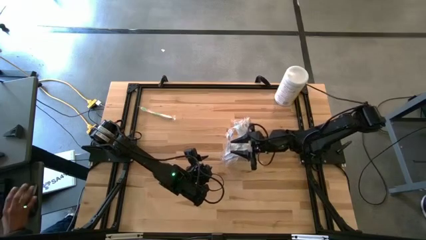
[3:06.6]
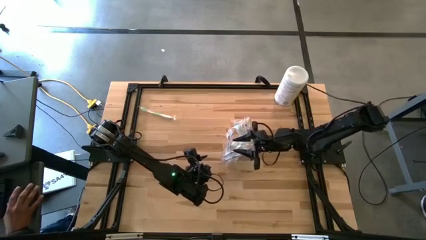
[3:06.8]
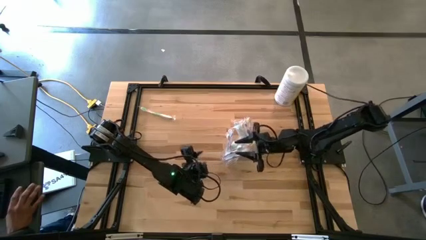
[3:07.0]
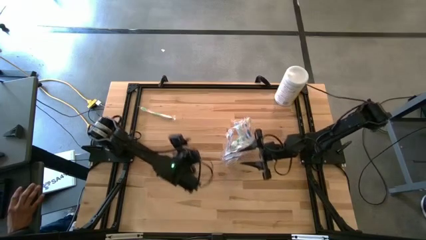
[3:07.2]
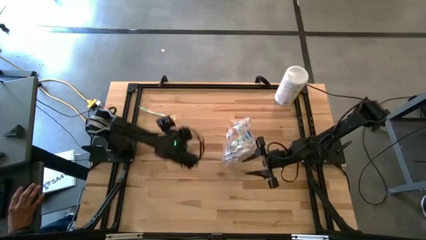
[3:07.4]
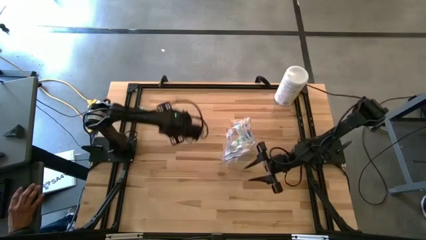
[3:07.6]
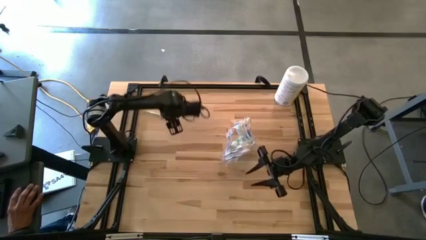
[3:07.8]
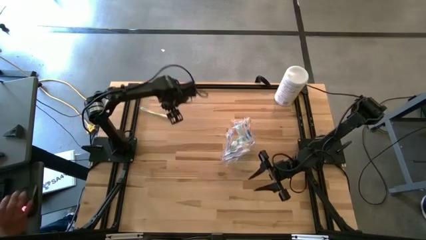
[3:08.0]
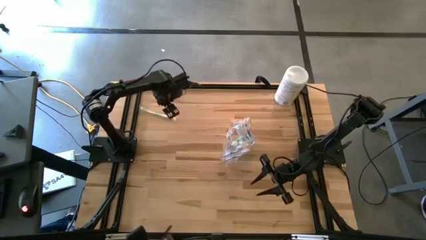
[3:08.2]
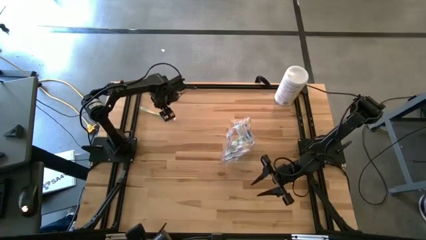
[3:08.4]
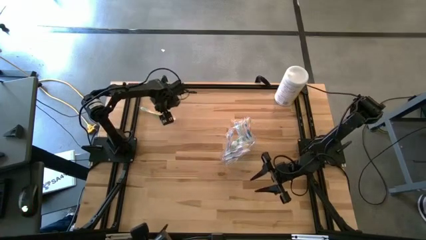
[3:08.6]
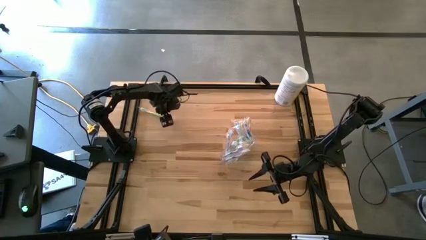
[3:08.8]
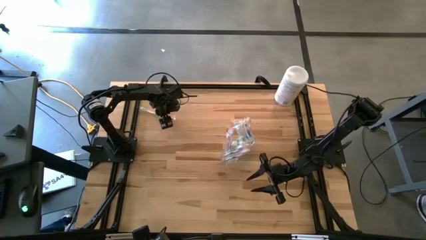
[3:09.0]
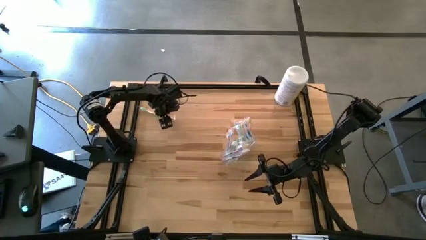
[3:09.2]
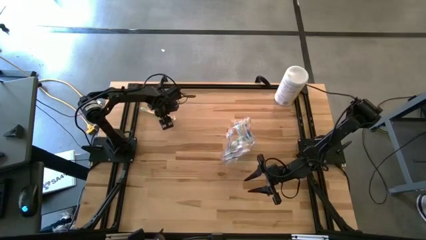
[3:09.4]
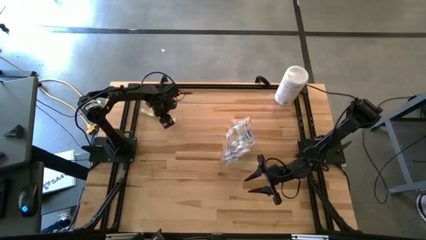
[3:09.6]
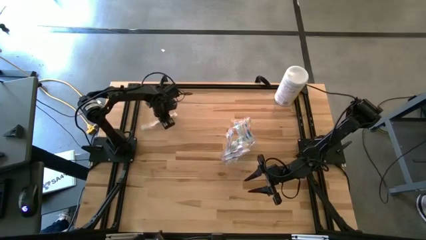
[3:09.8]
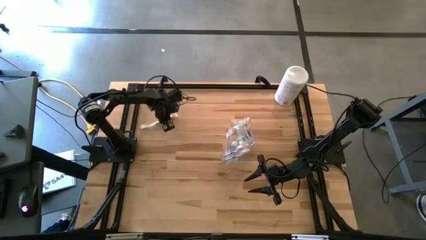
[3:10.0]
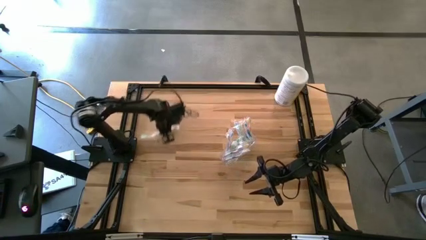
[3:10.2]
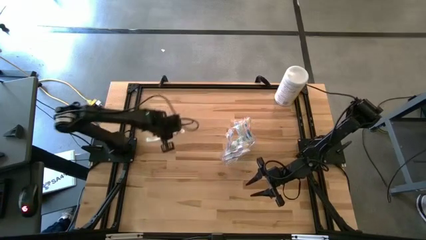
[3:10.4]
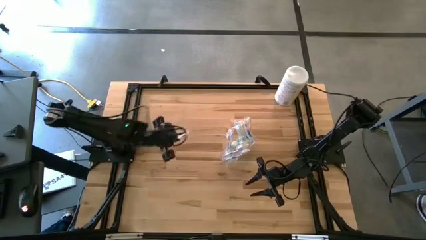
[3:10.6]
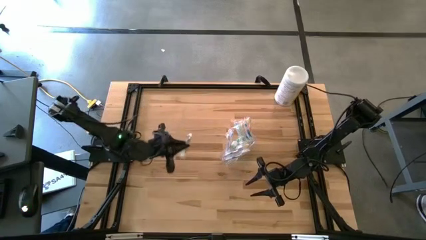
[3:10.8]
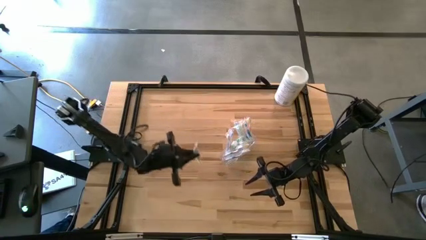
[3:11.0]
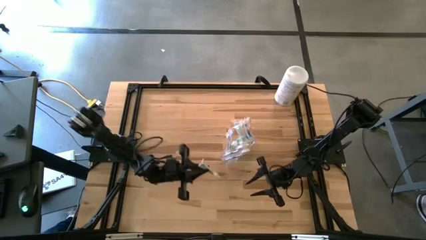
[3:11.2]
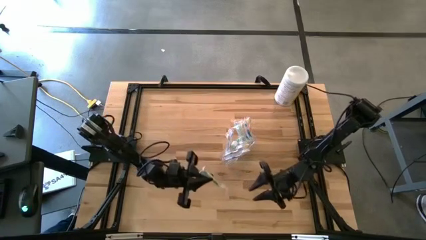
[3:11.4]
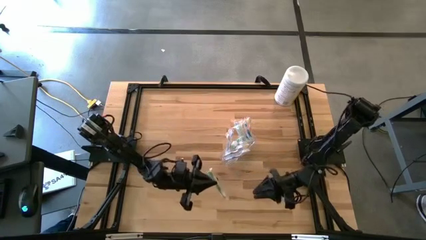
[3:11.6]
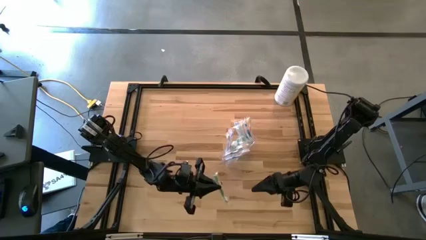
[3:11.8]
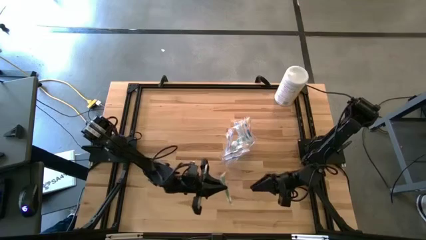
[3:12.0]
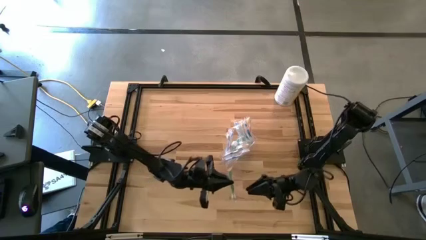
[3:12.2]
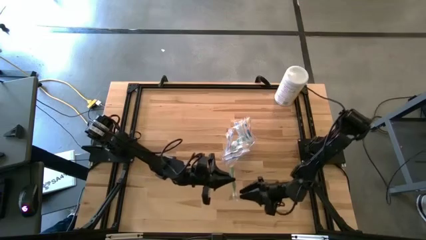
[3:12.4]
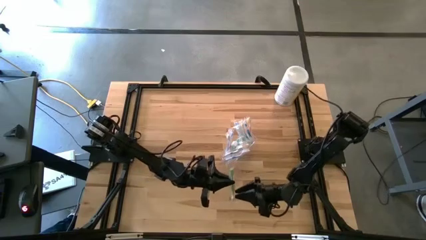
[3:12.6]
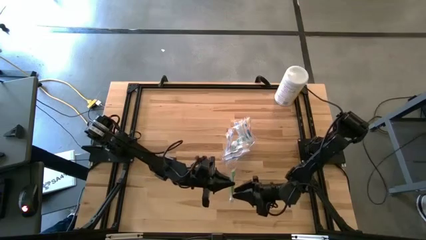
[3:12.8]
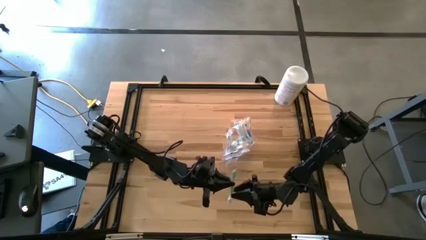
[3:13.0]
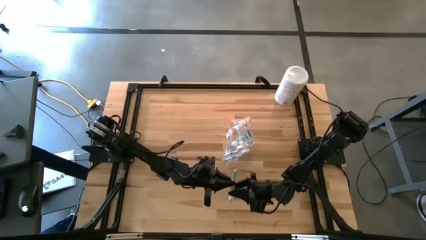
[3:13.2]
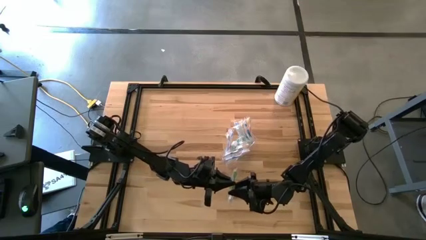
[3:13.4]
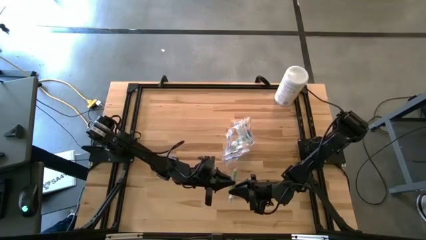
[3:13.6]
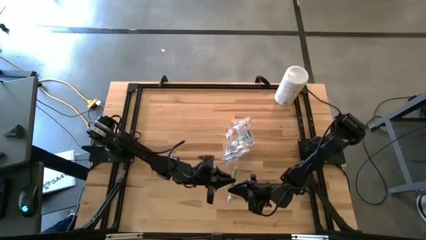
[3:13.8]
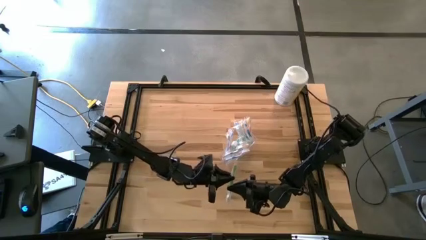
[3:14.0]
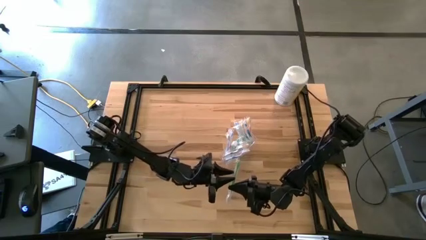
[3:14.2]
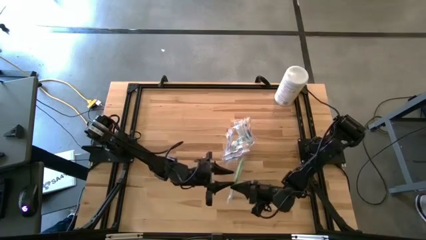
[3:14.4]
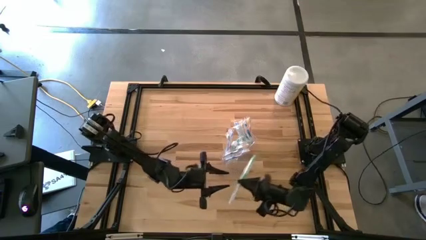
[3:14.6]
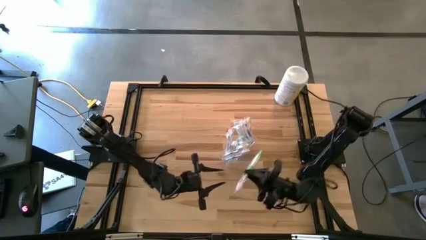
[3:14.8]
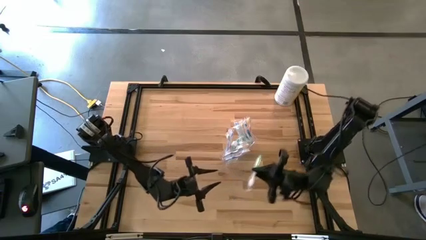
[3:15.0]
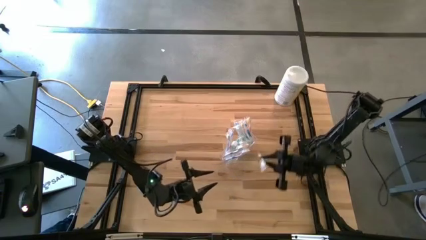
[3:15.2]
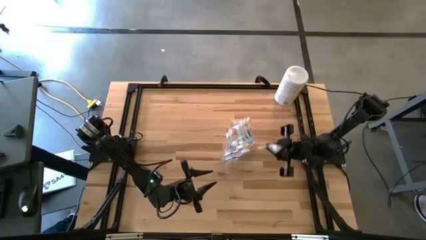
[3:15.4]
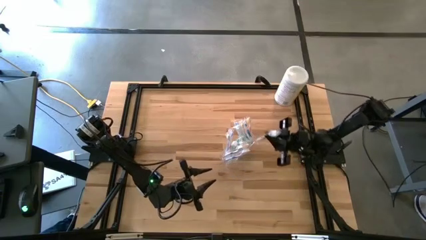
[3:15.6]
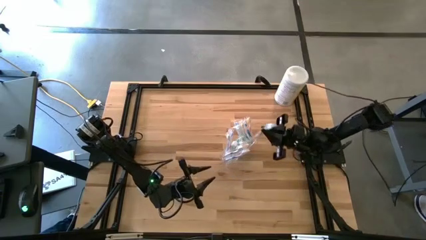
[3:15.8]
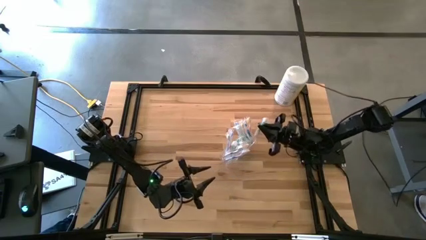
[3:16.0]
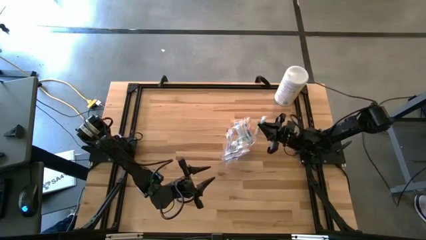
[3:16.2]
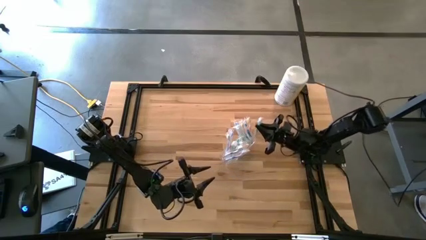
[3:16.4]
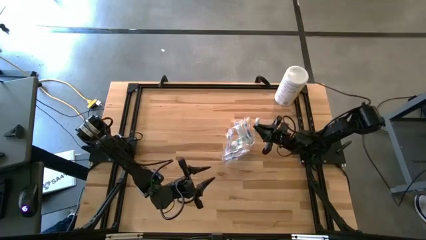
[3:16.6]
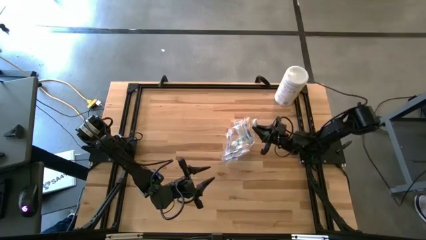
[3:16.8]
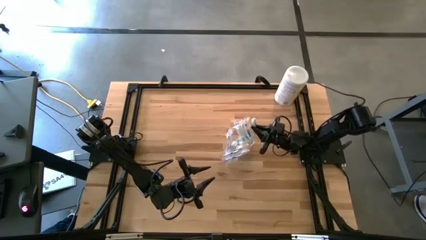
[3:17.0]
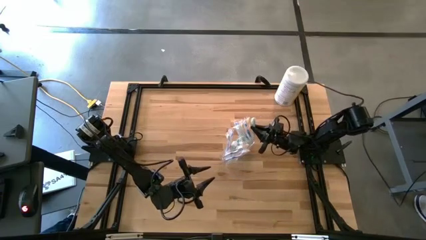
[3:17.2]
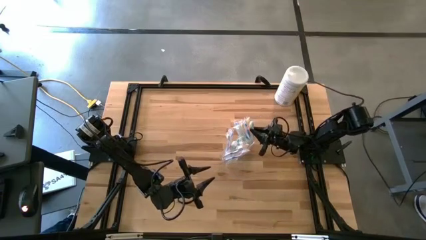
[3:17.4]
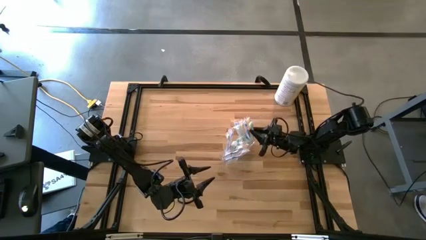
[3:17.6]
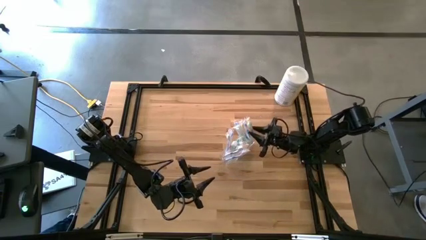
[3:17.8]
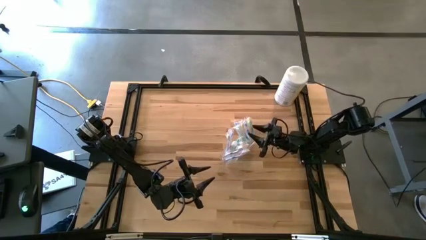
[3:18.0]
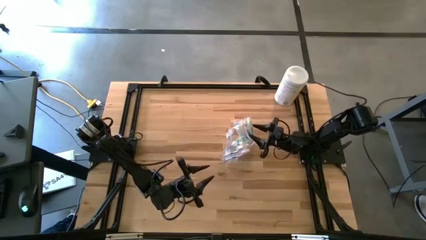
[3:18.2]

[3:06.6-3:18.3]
Task: Pick & Place toothbrushing station
Put the green toothbrush into the transparent organizer

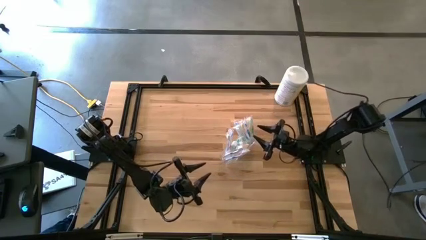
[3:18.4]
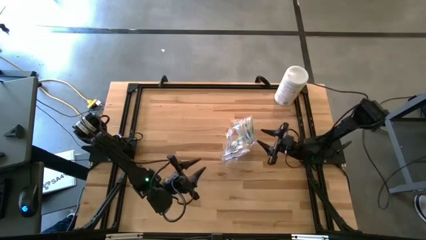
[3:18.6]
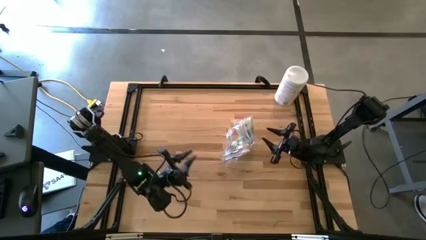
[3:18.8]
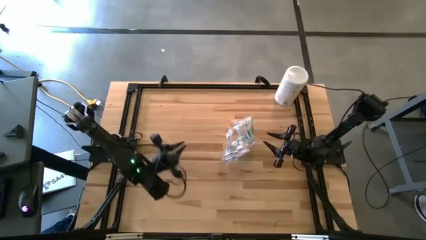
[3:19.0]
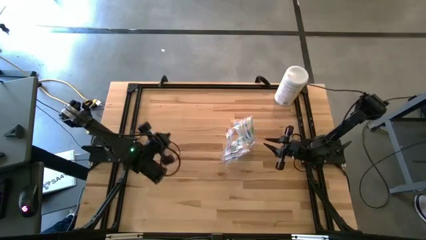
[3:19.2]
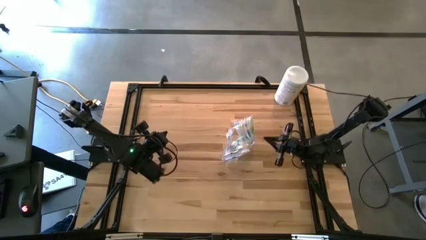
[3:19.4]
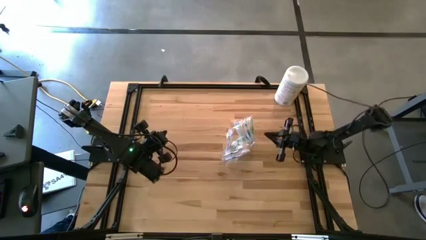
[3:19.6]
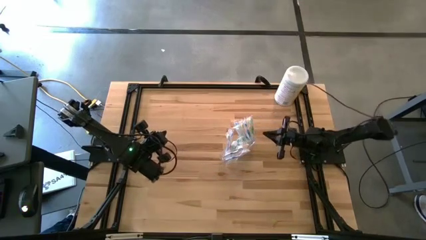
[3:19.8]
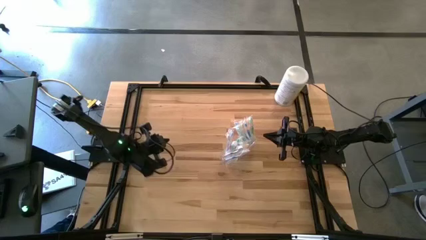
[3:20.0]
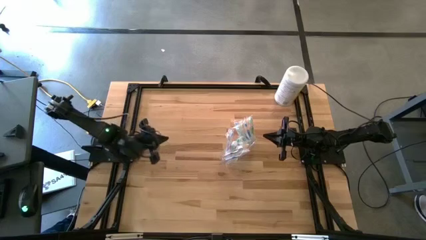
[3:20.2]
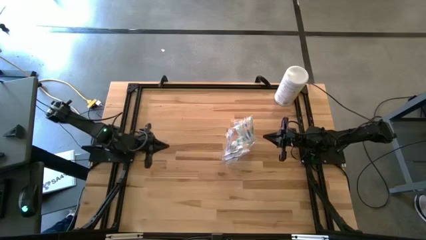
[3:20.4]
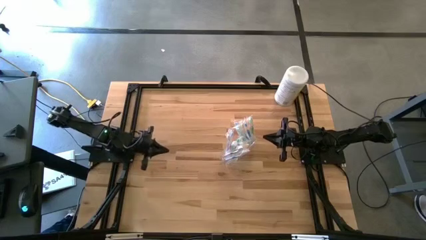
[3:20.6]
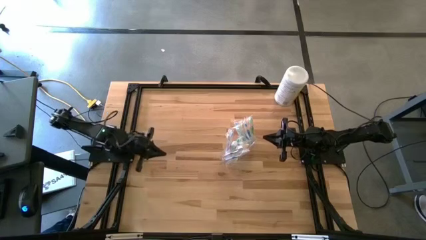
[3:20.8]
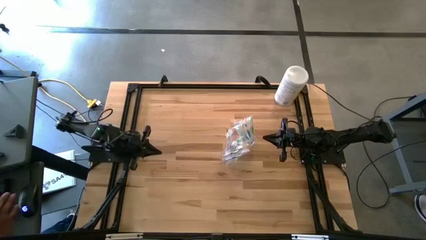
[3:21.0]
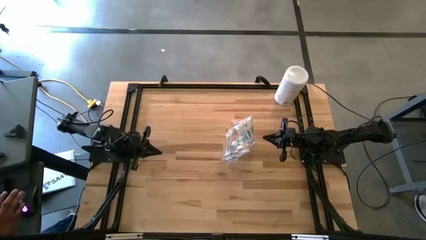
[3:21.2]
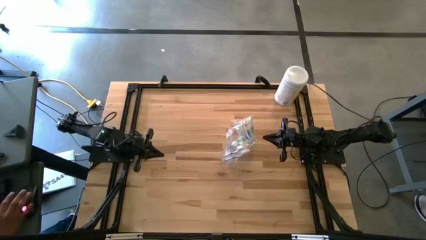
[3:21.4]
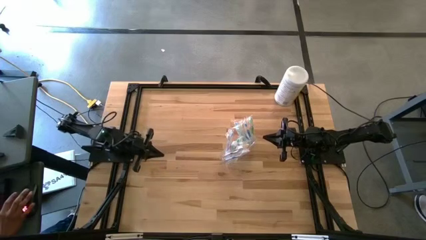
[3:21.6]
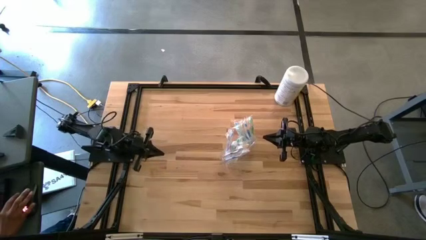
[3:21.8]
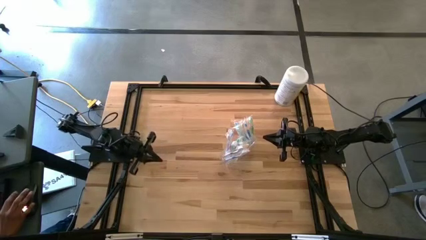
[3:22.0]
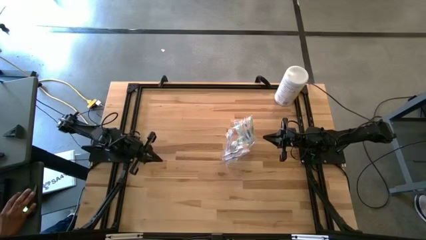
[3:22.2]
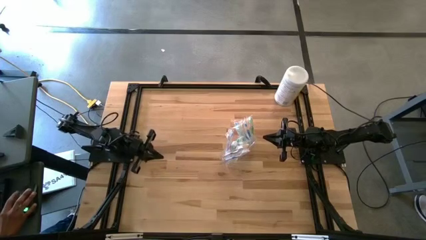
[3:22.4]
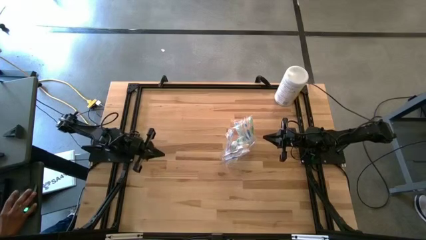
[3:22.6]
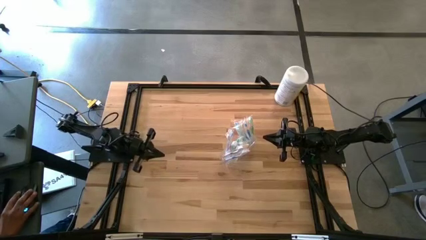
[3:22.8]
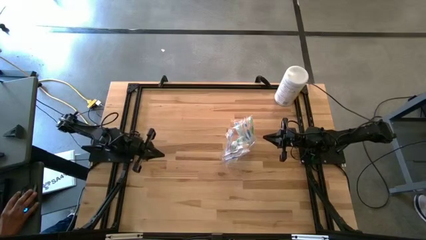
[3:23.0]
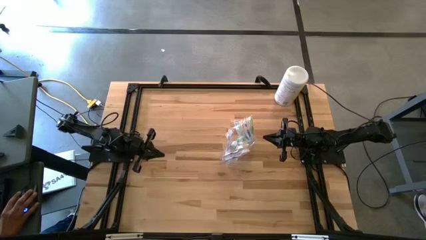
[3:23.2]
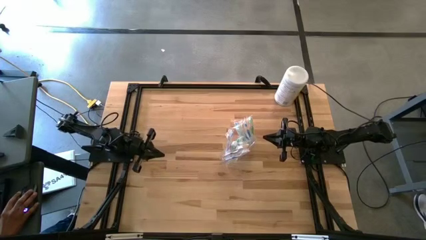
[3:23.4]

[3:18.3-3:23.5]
Return to Home Position
